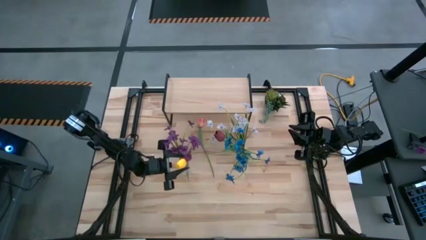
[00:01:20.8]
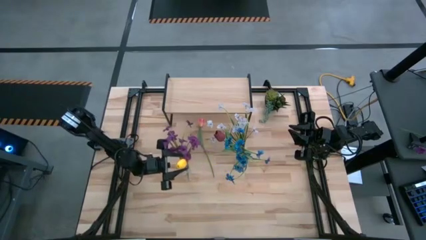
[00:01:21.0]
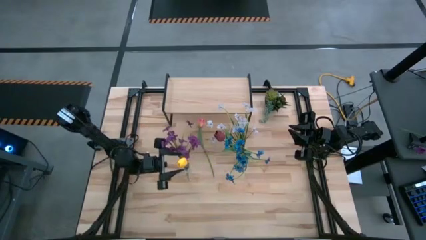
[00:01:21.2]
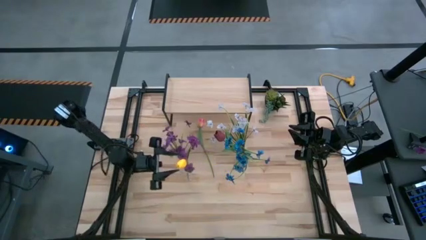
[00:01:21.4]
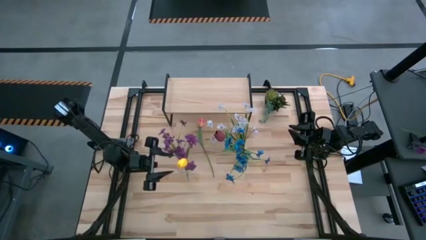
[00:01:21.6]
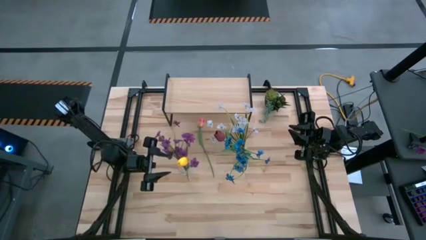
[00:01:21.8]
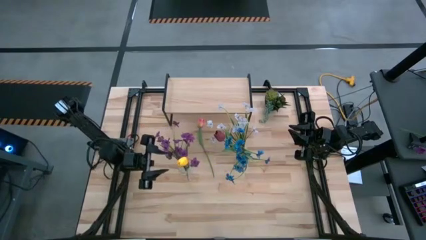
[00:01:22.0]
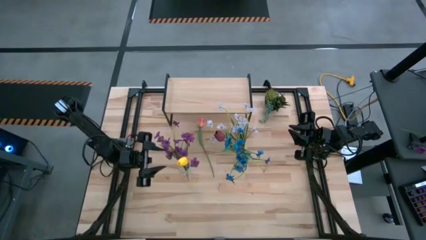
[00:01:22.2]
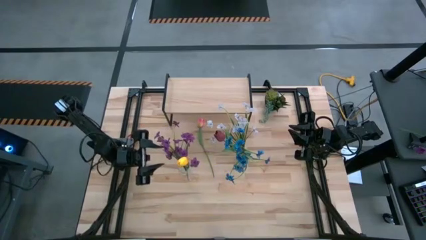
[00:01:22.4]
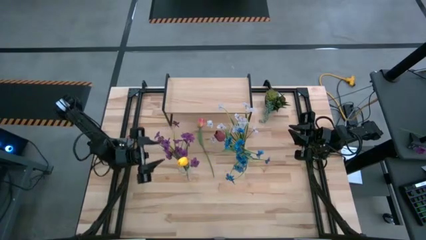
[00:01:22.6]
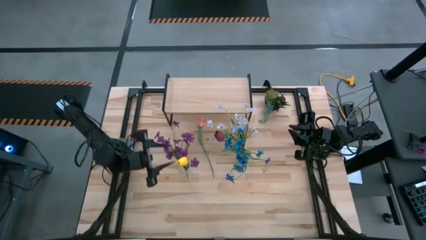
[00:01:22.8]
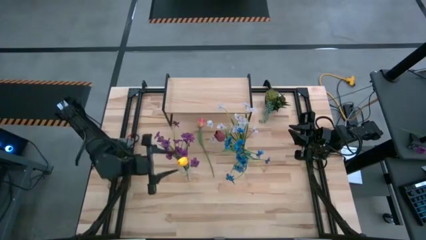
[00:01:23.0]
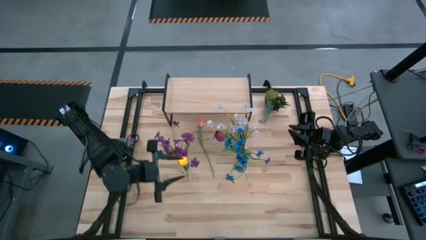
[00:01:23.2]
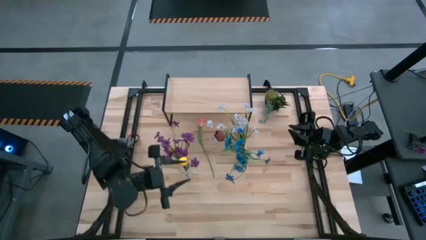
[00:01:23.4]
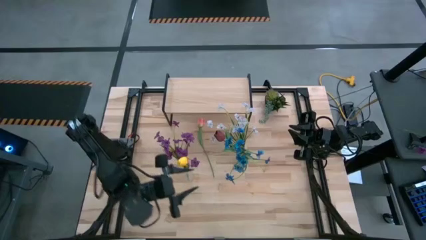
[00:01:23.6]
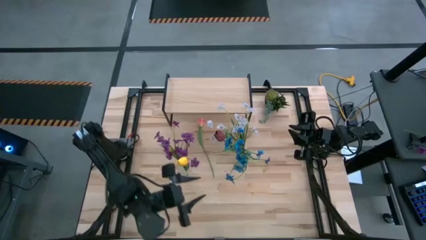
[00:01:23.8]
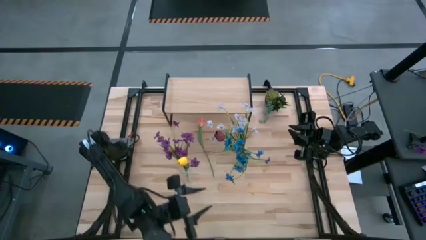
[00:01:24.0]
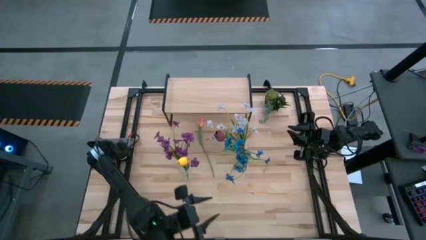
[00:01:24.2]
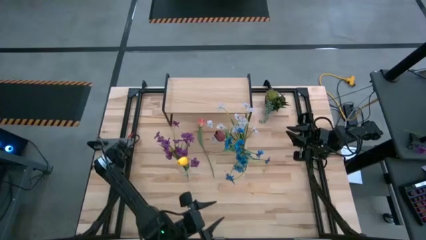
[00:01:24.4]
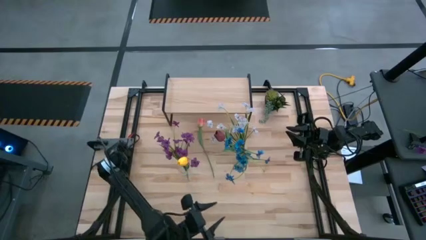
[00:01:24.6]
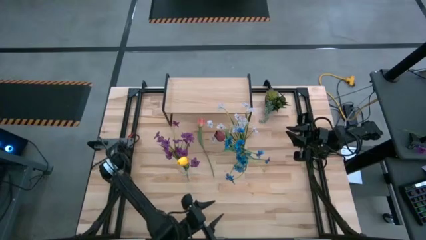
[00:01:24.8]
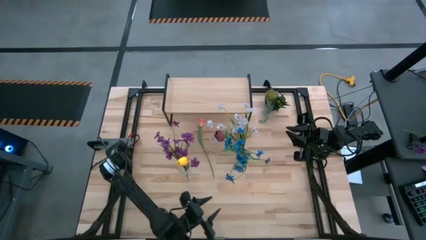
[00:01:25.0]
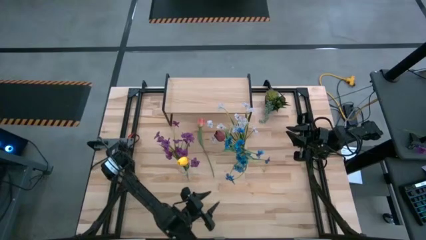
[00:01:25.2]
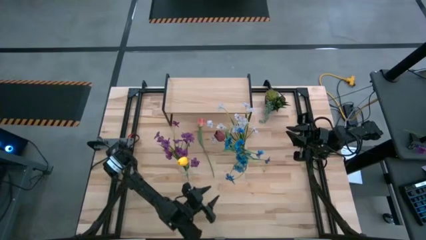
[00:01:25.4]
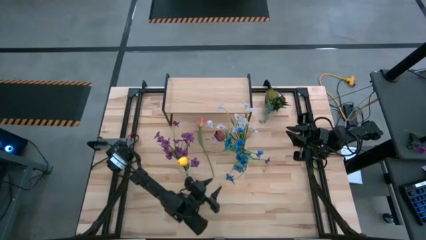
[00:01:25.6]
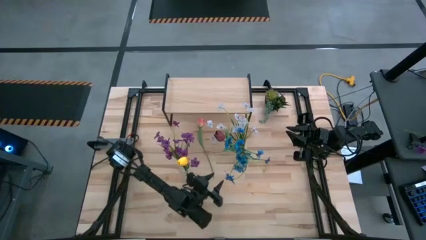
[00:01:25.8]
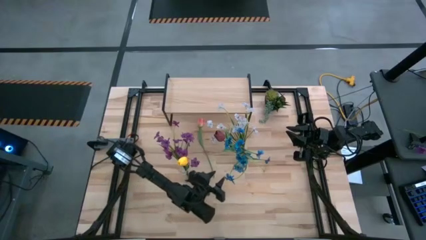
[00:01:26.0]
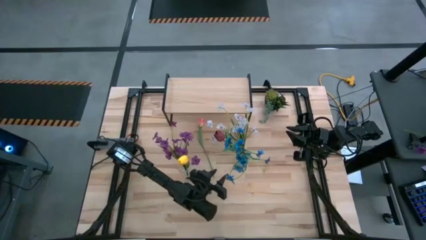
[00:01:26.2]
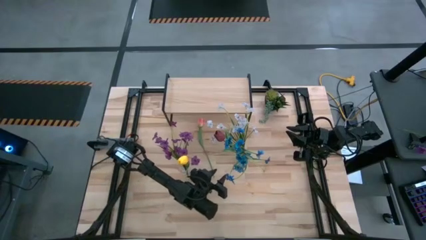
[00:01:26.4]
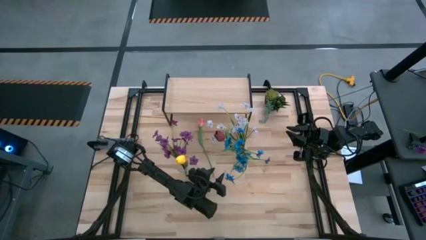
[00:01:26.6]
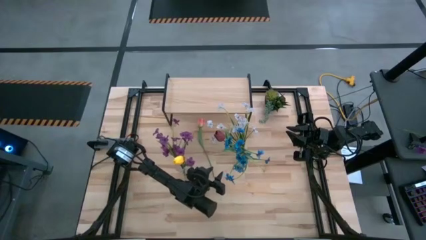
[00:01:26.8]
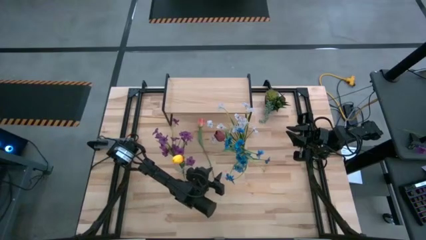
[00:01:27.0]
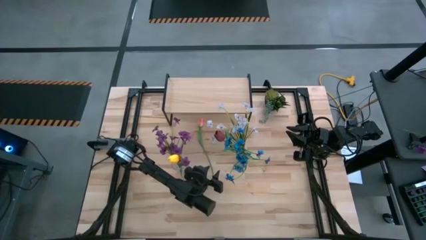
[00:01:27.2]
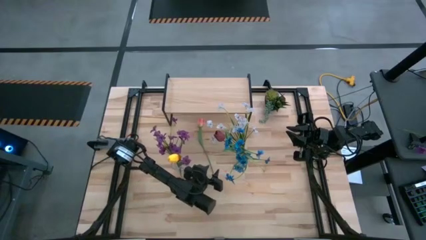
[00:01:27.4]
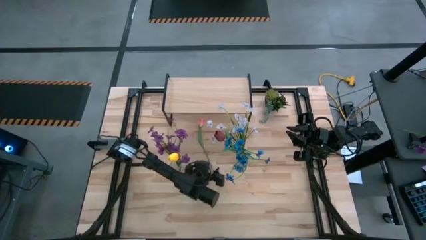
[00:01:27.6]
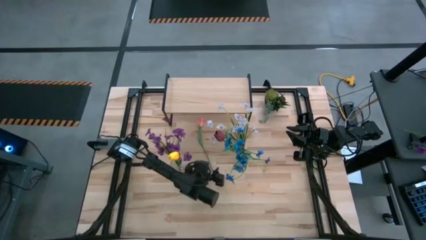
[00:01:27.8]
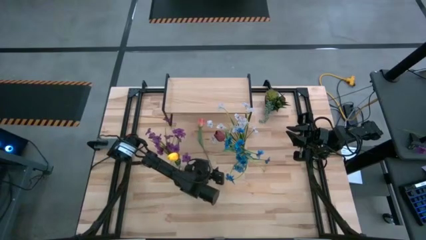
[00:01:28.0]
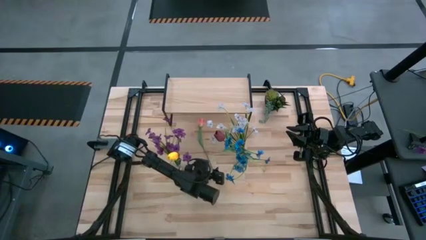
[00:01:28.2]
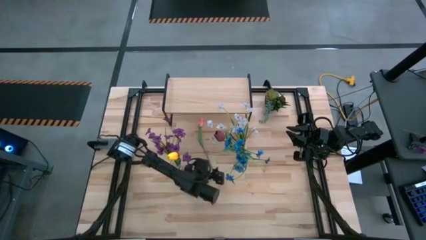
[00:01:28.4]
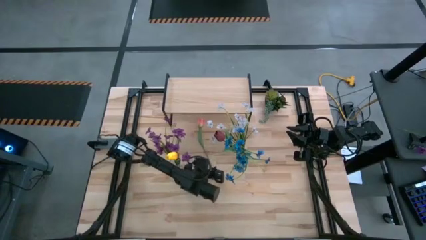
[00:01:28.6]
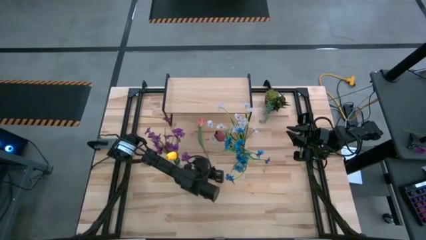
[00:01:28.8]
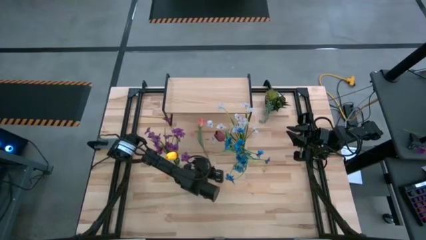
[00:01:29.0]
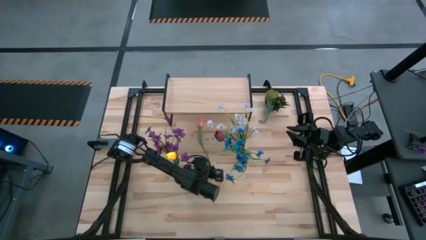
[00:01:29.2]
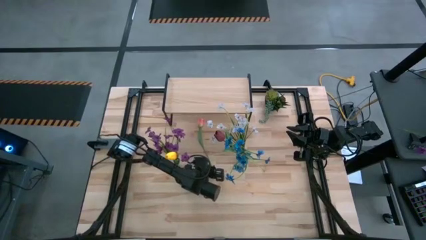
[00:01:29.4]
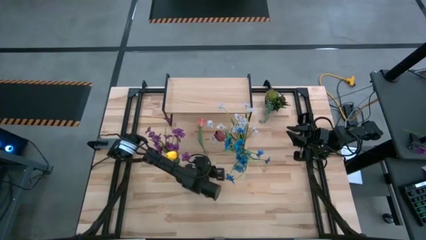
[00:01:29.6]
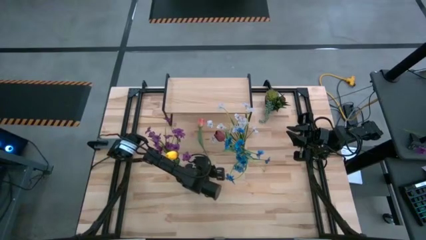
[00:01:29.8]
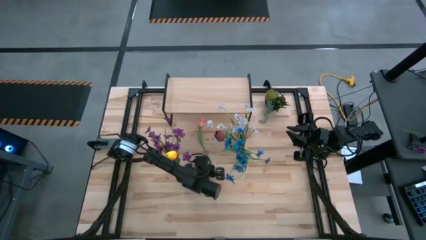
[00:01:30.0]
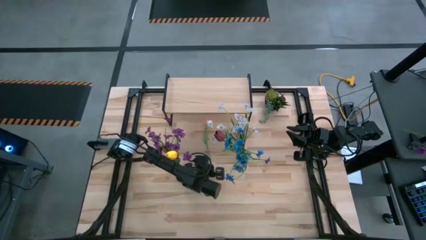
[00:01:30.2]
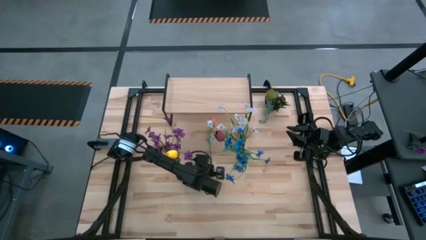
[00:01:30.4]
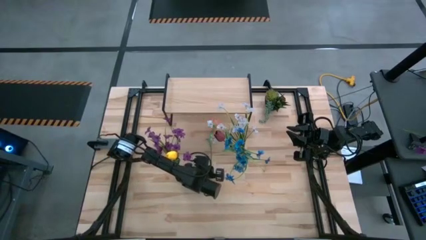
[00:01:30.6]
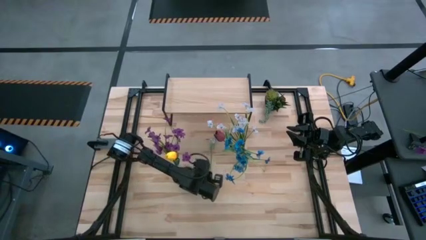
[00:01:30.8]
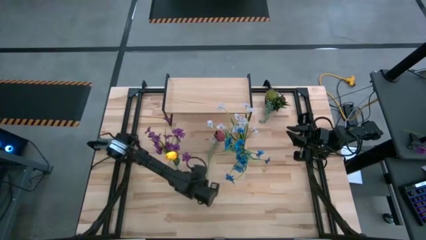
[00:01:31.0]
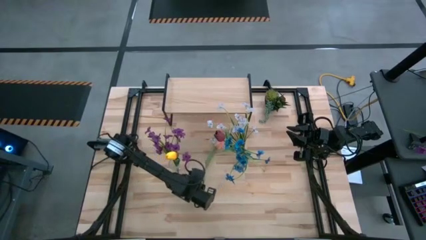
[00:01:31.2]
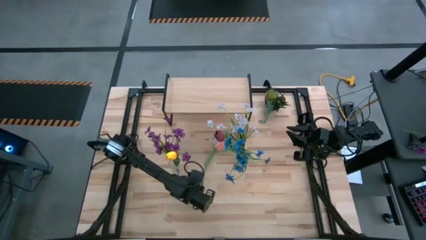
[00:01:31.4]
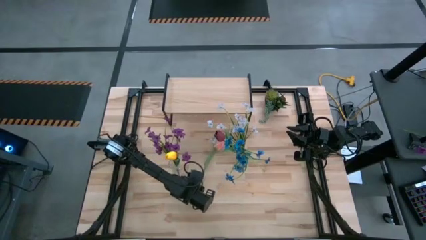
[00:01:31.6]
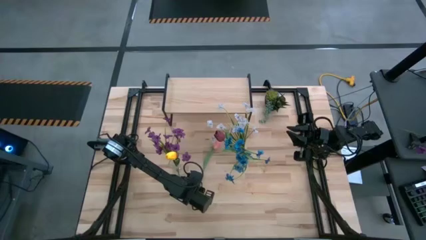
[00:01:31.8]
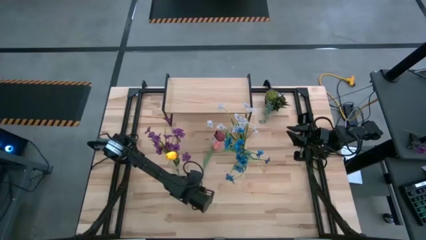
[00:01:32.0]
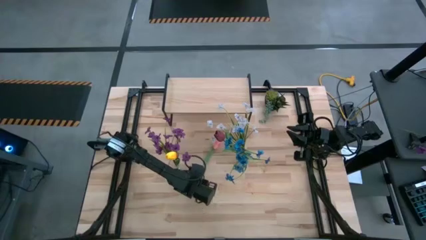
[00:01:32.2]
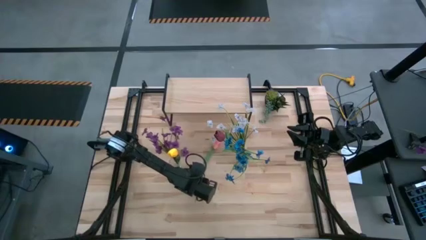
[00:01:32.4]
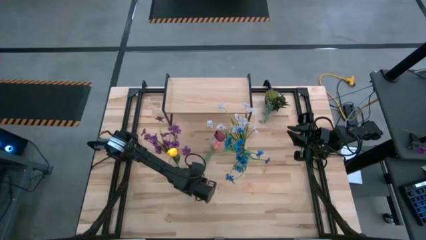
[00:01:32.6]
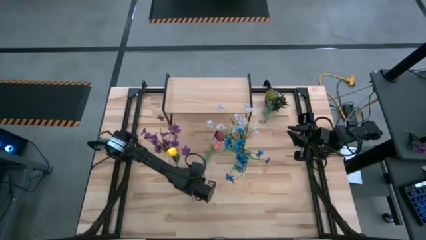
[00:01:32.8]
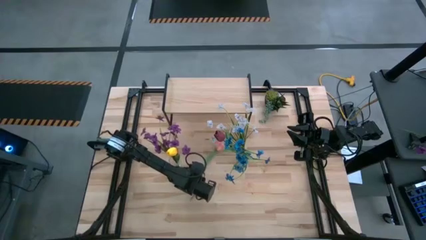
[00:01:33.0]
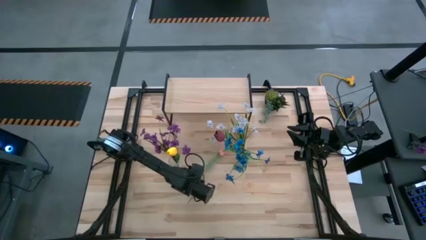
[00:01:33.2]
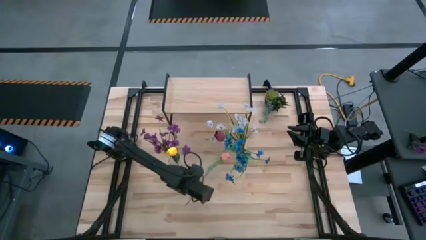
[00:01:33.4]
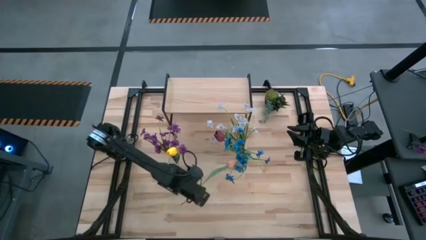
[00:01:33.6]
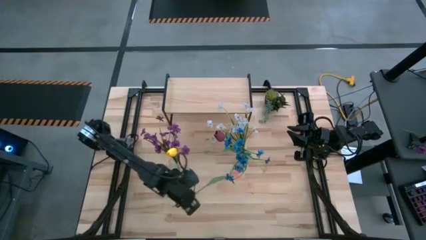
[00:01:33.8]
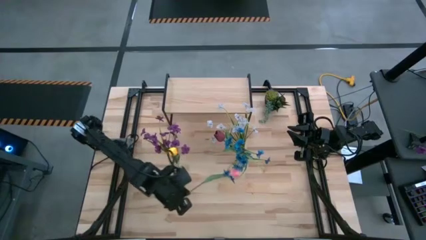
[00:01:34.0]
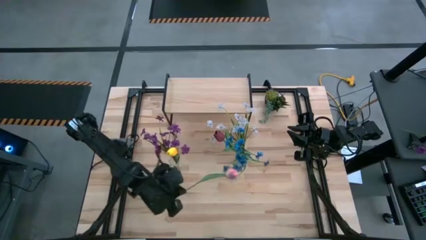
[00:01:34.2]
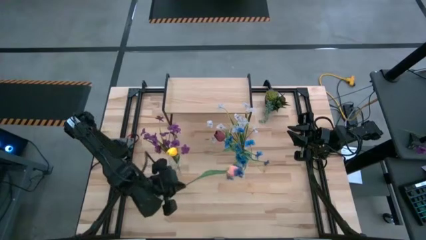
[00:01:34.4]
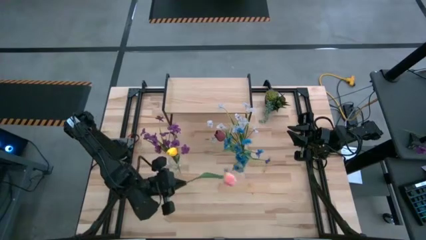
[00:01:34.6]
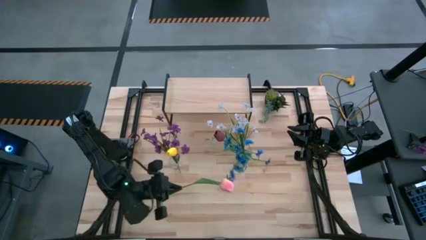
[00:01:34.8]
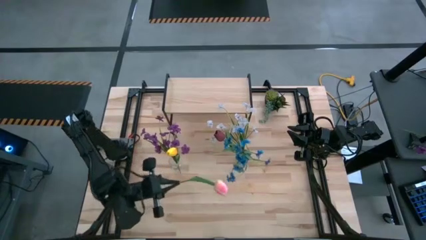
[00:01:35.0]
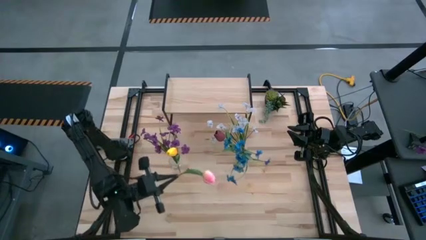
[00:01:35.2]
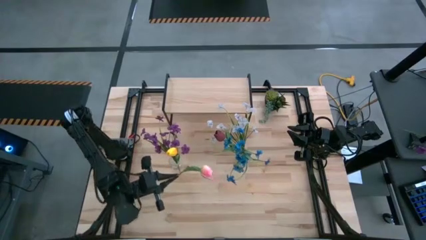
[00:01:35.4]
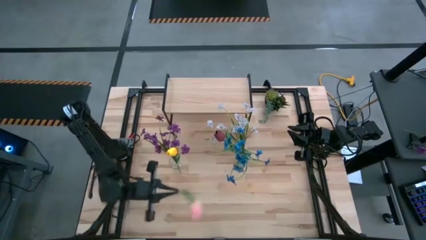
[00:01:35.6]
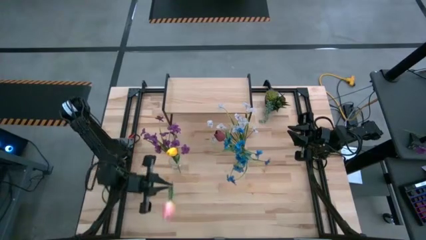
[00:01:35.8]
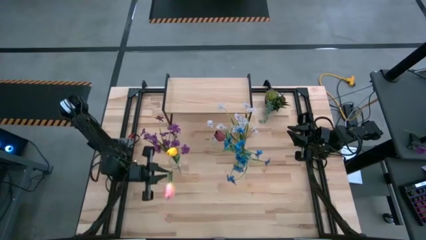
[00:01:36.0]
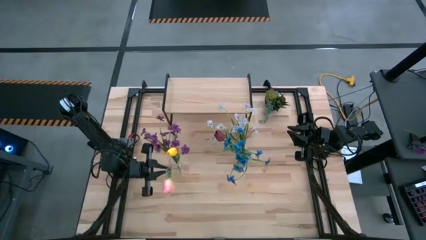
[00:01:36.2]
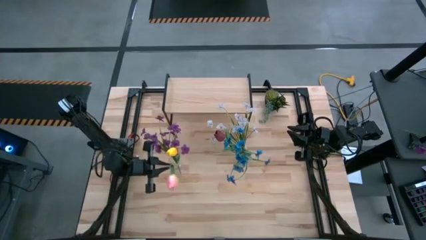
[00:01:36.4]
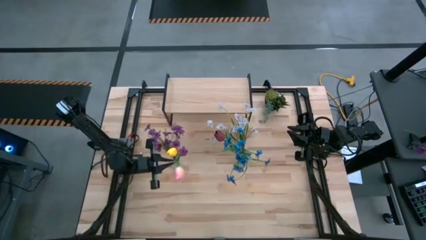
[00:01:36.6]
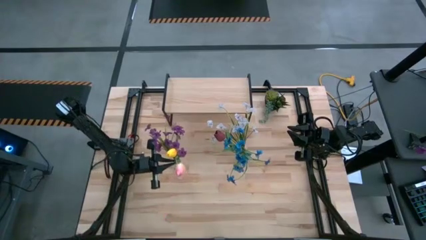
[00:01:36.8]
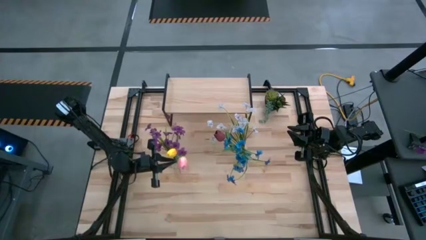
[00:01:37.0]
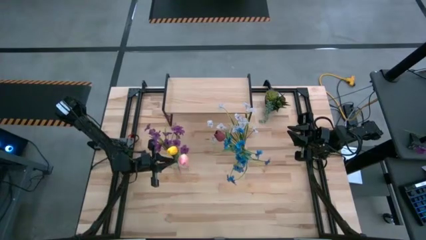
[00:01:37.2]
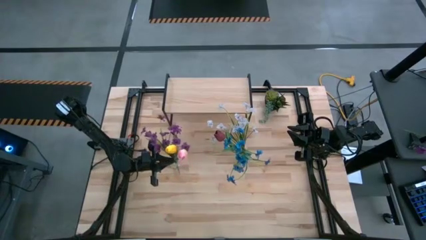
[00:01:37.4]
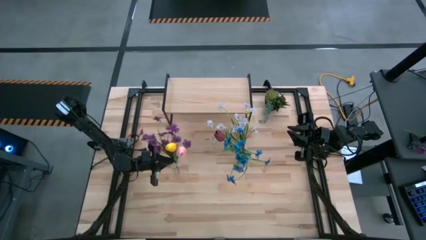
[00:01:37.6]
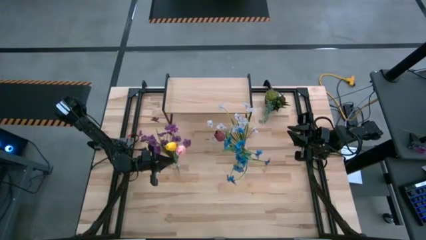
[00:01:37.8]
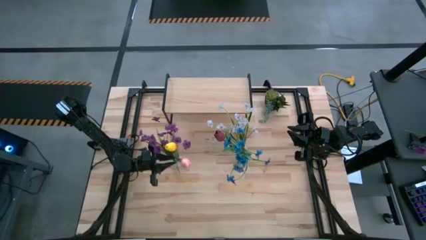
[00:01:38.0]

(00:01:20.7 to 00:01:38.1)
Task: Pick and place flowers into a vace then onto a shelf
Put the pink tulip into the left crystal vase
